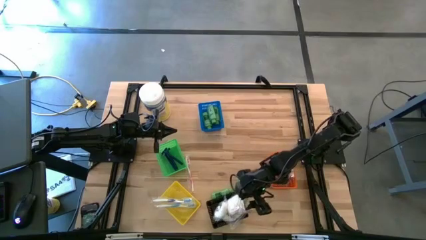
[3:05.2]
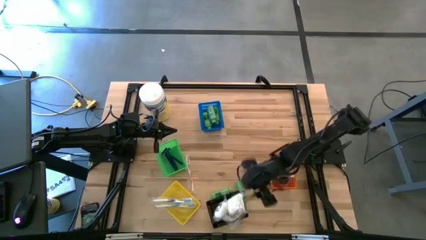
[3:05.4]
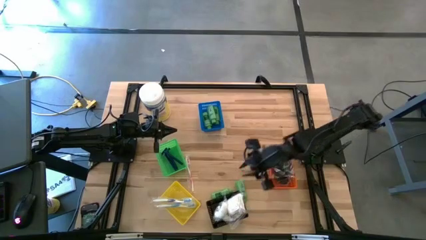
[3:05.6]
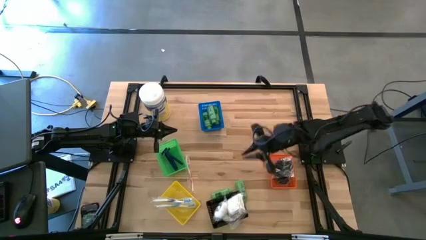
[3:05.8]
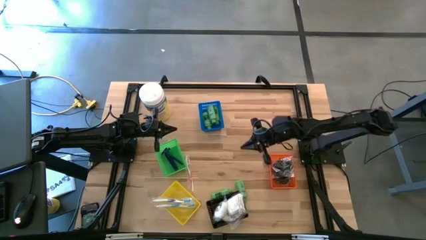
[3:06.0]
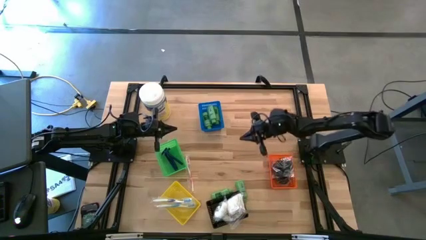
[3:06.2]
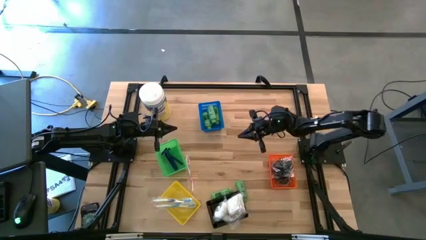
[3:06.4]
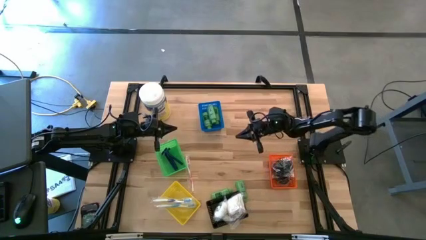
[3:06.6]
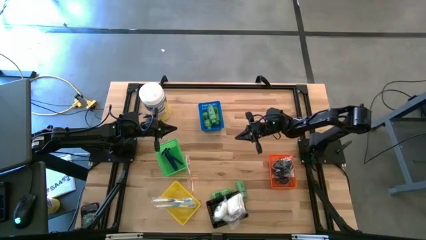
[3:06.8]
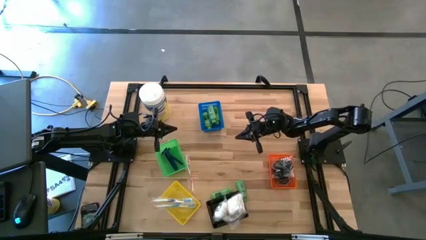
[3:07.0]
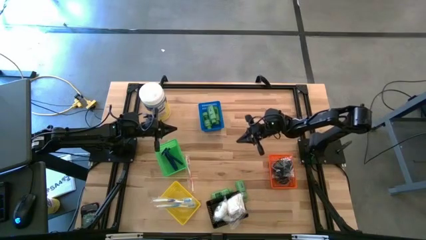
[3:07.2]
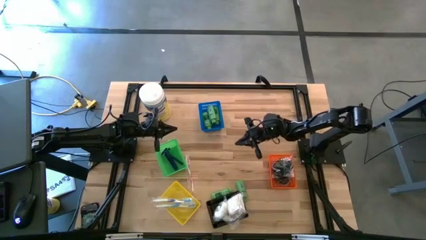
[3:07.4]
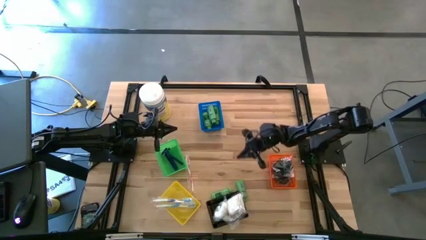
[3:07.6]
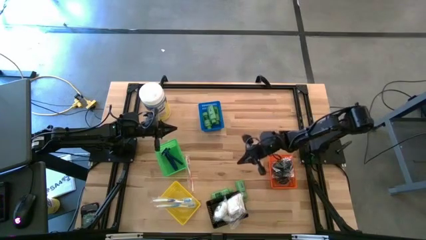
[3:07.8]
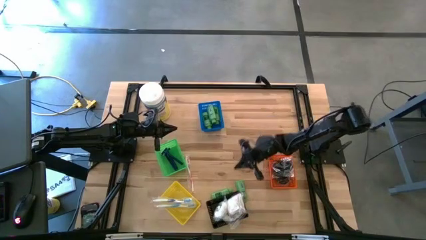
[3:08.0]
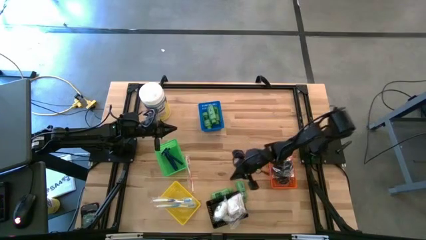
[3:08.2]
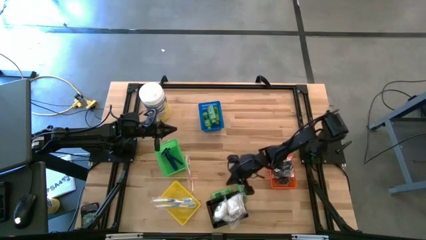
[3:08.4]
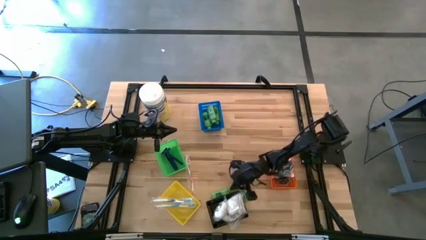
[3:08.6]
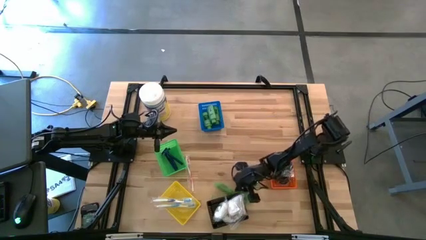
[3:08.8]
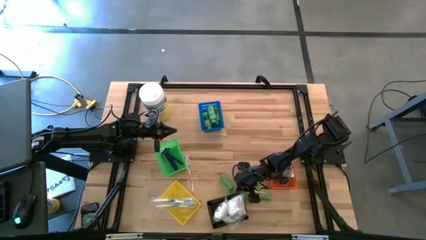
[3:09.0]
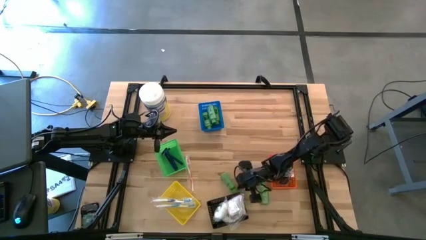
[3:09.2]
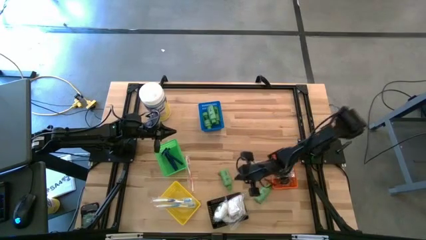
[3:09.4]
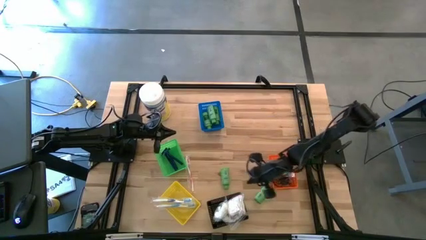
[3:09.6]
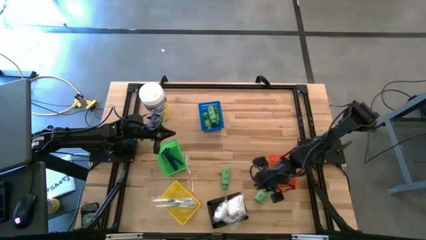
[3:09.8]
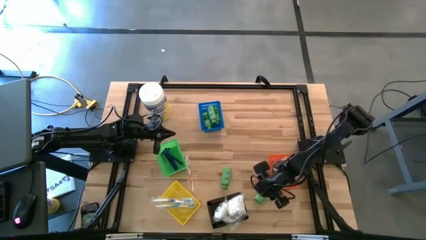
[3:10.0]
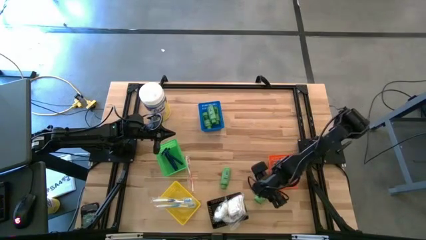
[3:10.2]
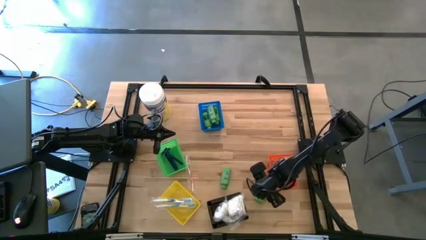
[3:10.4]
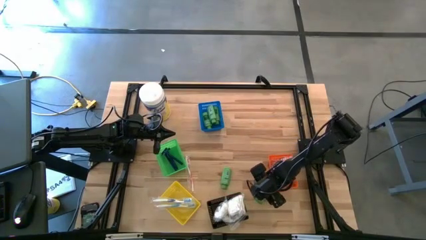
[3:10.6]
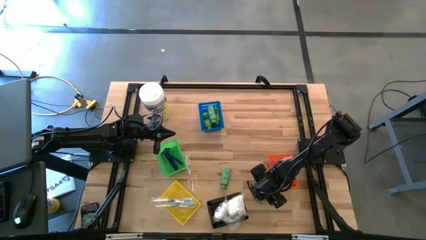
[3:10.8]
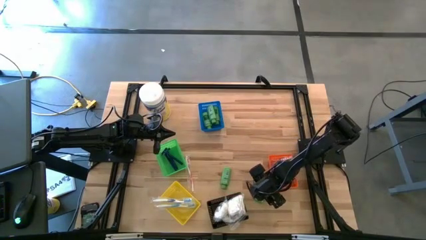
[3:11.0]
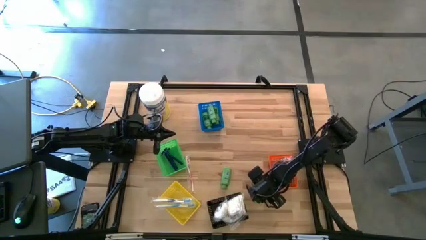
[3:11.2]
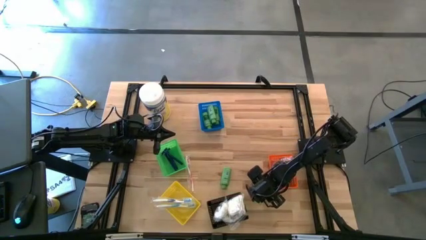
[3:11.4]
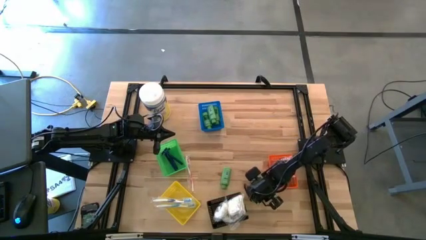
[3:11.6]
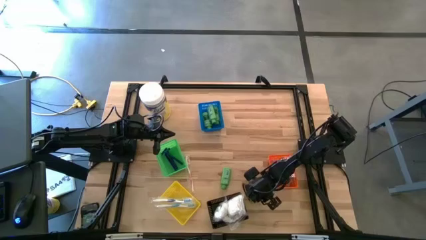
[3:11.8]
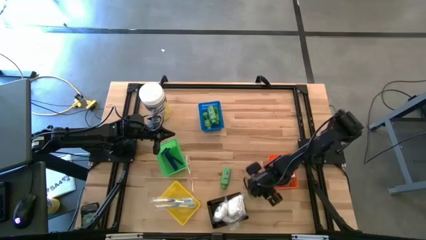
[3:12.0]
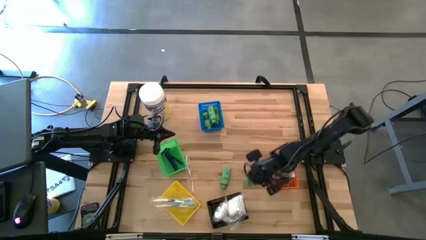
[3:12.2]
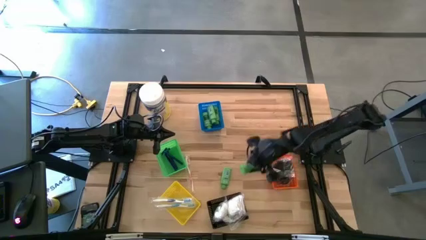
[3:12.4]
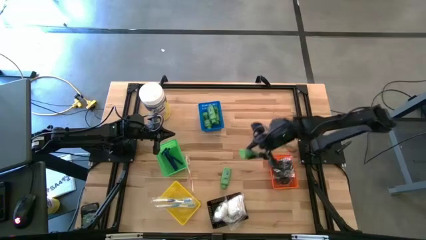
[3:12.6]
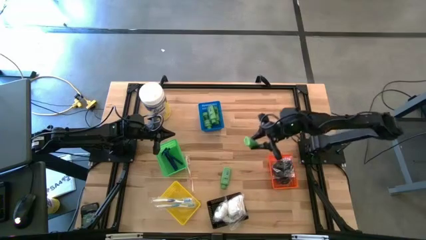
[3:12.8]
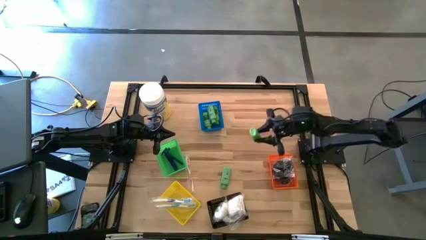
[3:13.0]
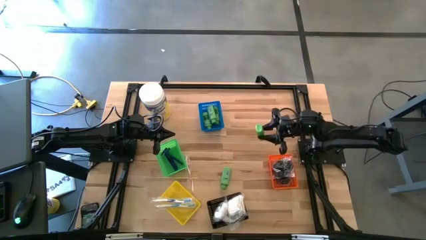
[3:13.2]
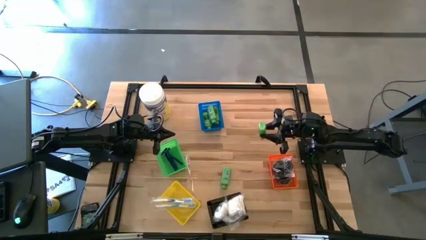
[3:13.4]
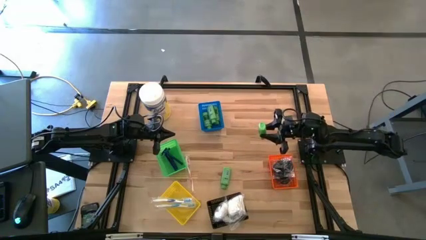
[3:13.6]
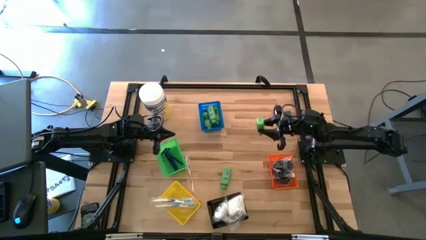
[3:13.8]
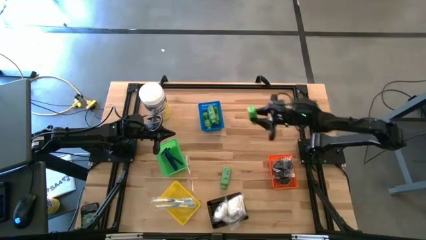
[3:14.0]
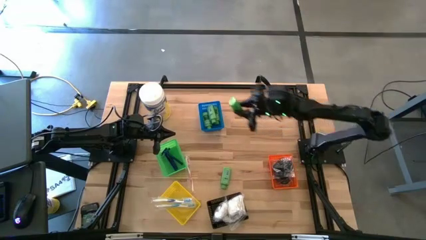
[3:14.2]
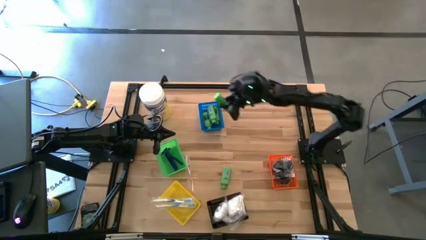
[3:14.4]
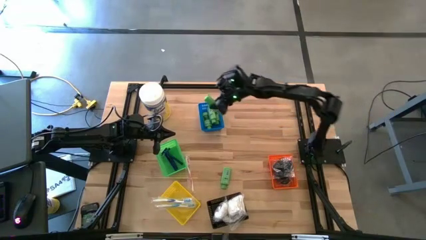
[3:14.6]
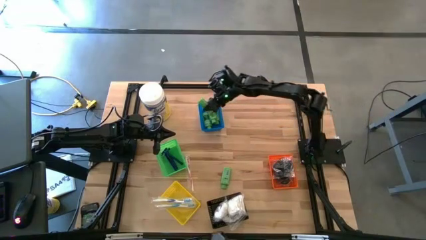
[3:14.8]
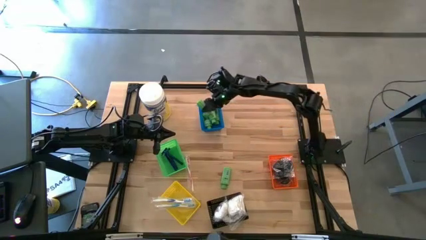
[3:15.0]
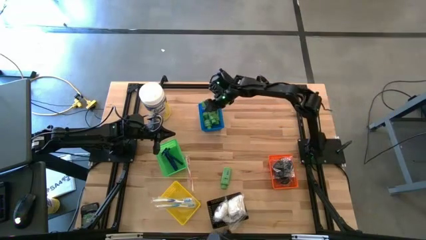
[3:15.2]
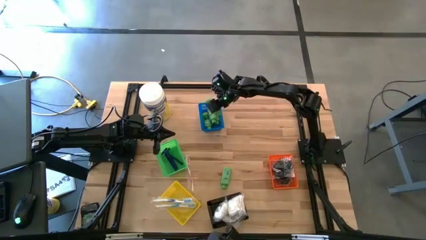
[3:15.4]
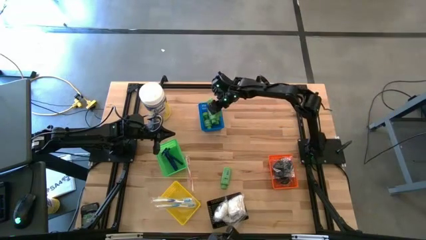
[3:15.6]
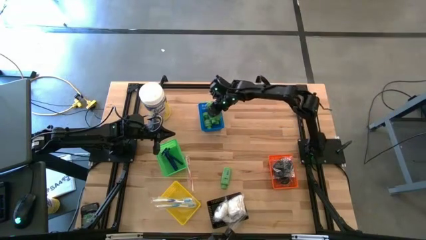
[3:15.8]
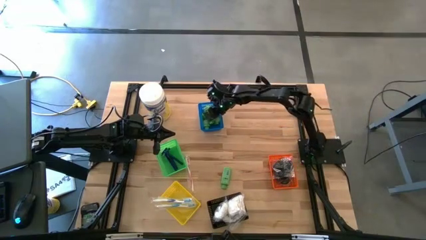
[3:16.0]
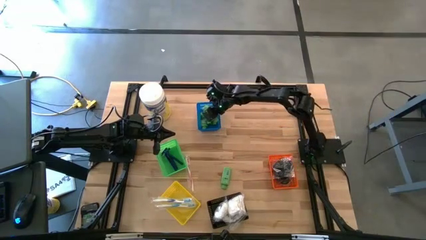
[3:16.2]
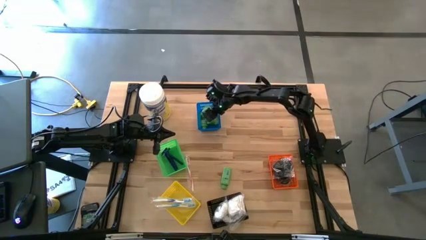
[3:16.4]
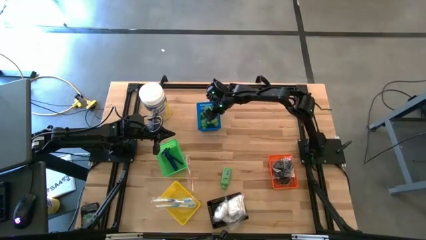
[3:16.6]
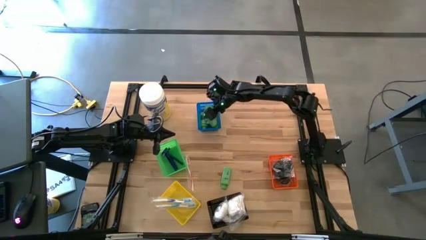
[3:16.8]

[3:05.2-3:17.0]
Task: Pick & Place Travel size toiletries
Put the shampoo bottle into the blue bin

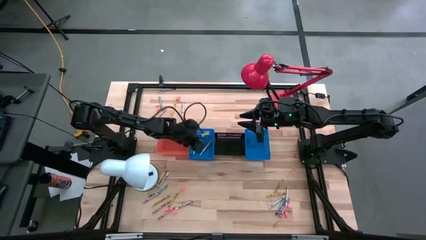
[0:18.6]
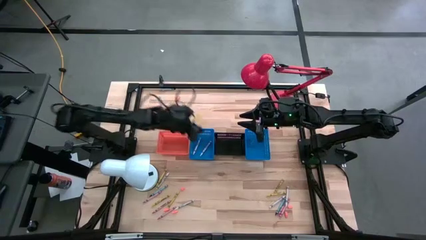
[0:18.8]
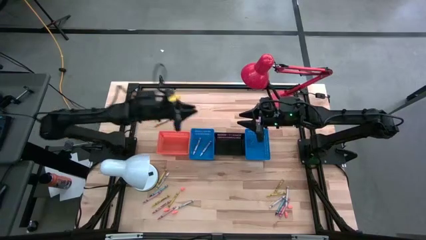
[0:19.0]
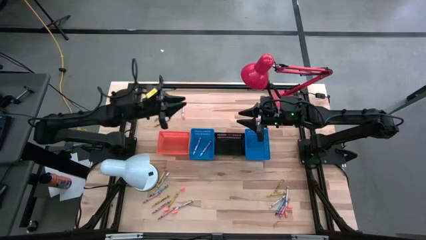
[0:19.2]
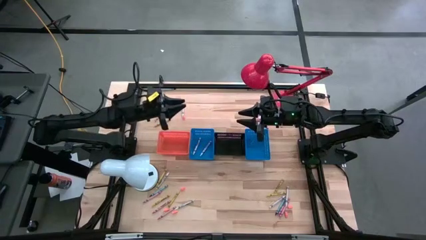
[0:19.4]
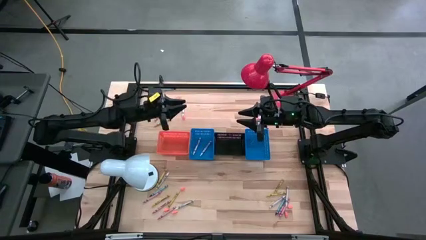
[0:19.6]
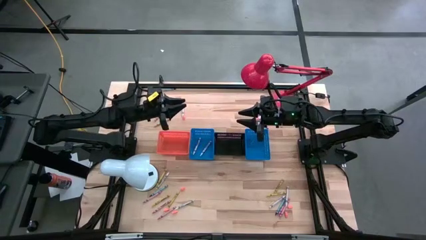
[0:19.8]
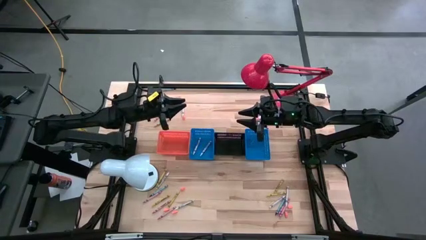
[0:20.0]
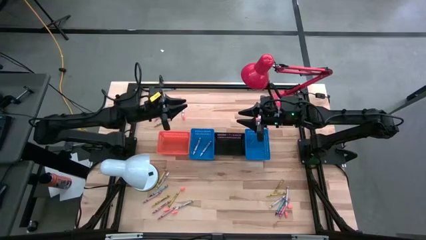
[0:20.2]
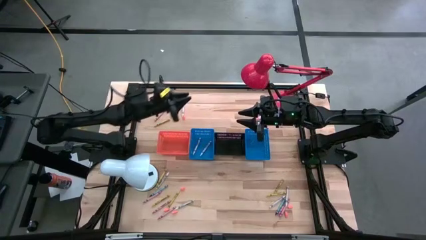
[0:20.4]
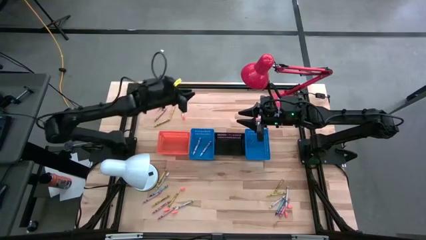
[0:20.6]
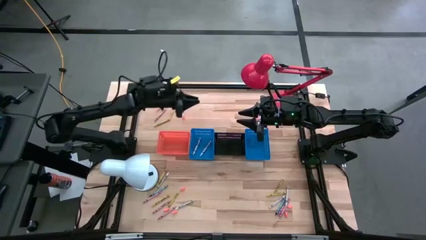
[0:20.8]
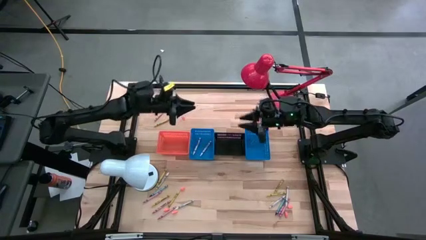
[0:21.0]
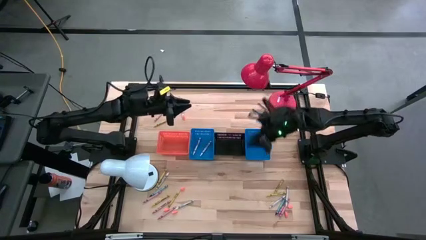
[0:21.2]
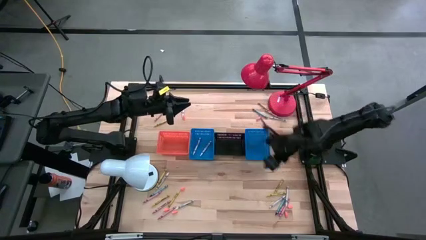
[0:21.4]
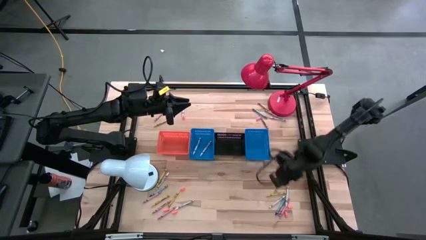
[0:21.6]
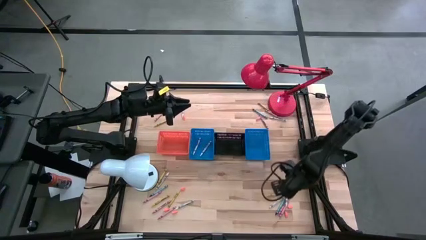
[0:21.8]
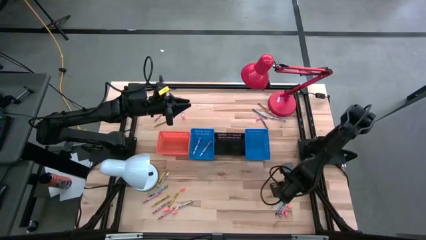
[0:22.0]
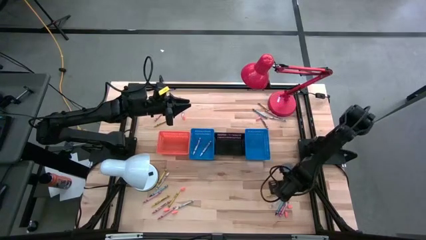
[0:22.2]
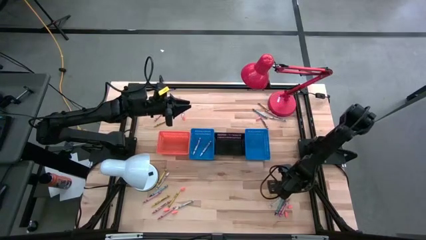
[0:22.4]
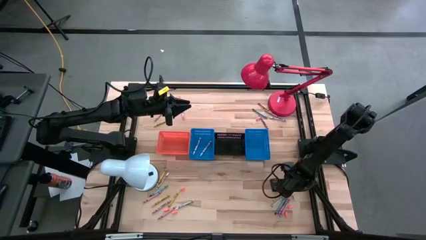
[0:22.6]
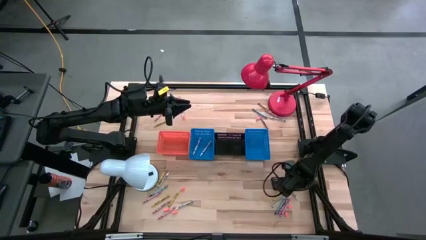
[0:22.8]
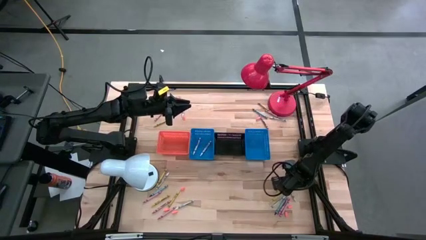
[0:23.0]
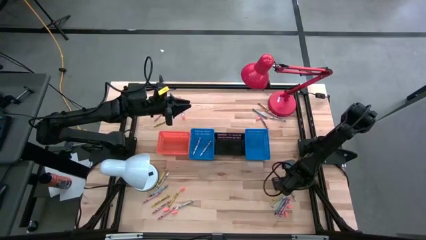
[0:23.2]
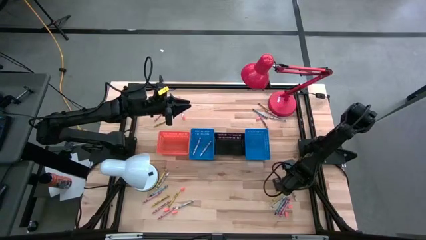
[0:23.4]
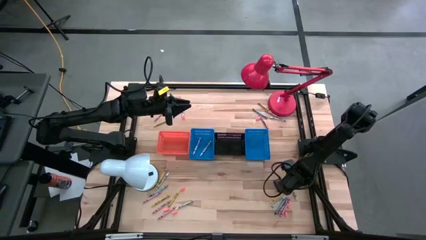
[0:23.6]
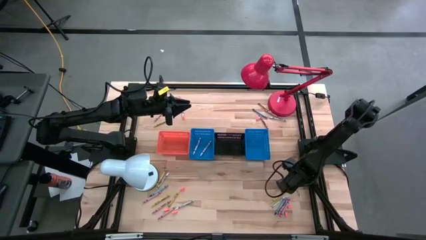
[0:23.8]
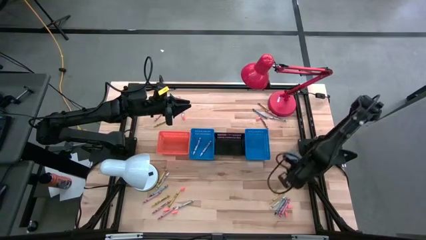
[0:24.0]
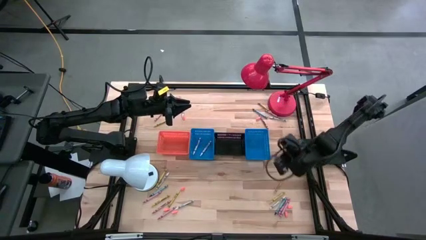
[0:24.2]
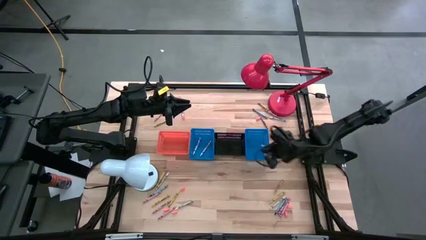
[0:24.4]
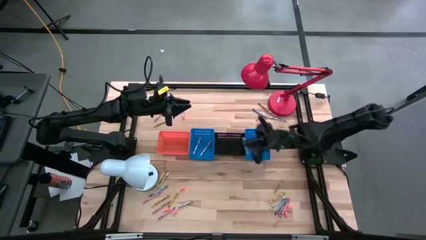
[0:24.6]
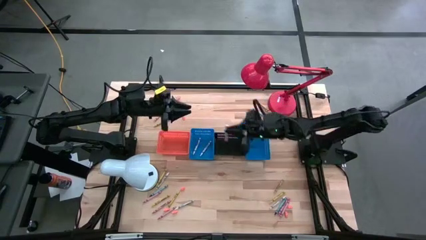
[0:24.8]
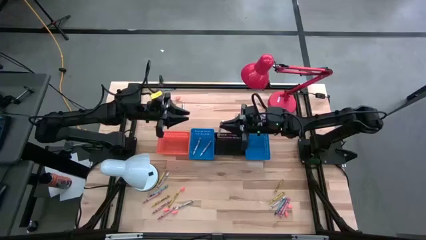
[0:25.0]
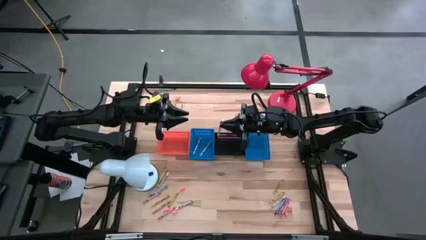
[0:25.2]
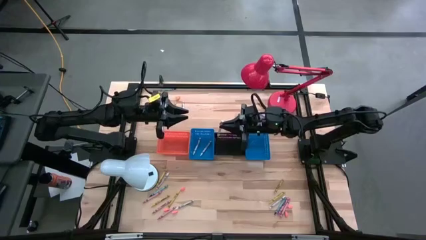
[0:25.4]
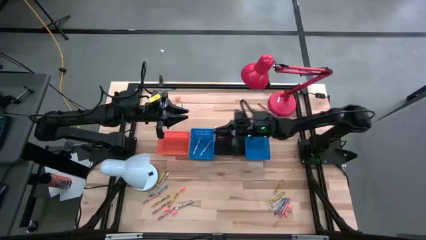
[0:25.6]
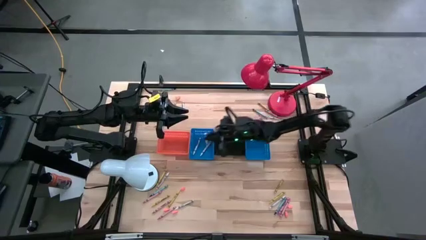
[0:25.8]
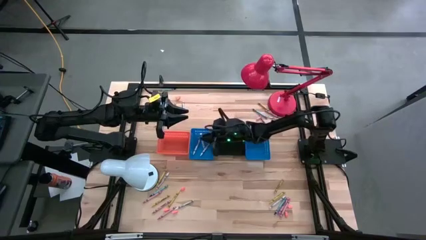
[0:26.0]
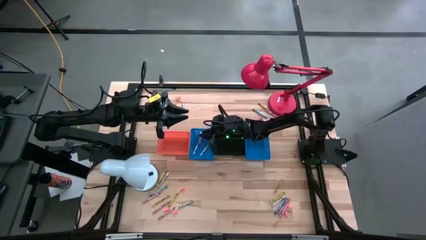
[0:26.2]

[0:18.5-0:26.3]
Task: Sort crayons
Put the white crayon into the left blue bin
